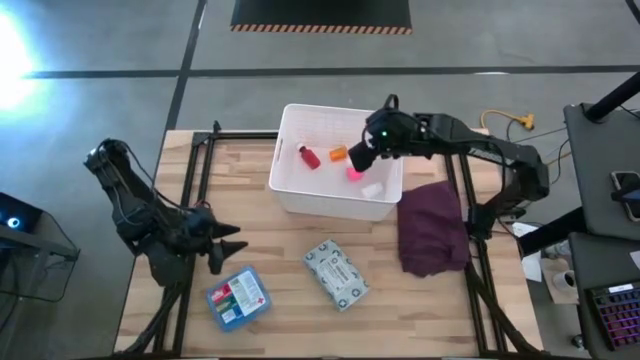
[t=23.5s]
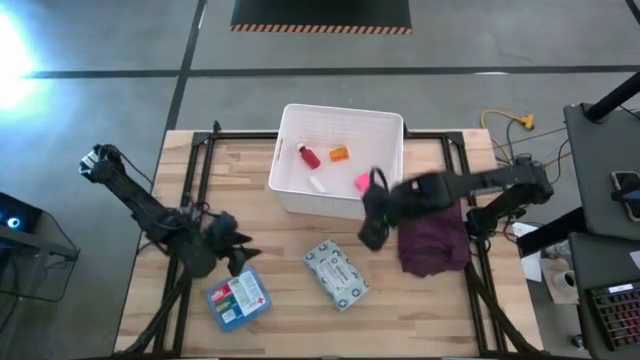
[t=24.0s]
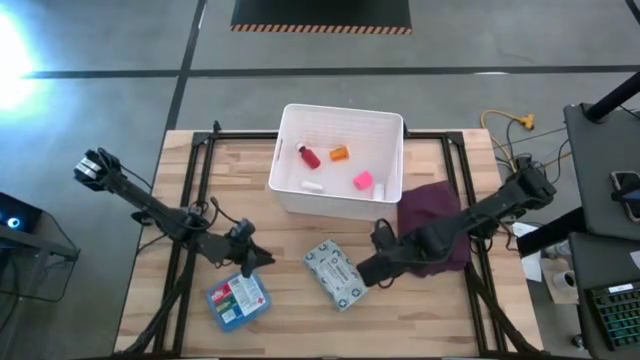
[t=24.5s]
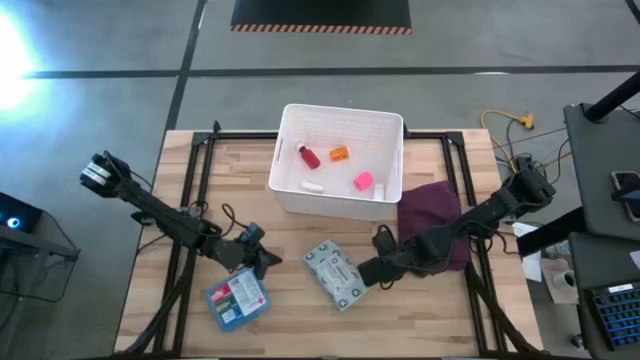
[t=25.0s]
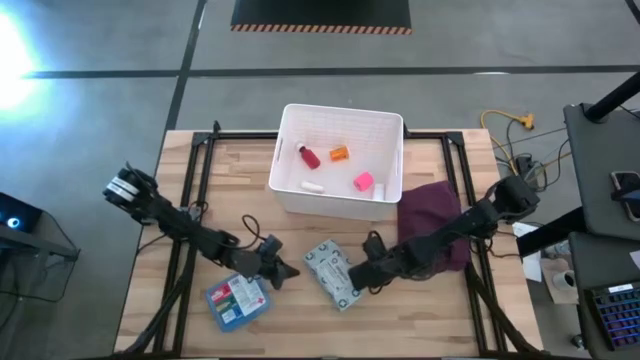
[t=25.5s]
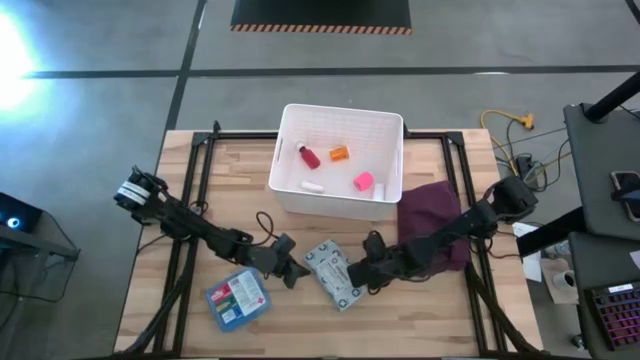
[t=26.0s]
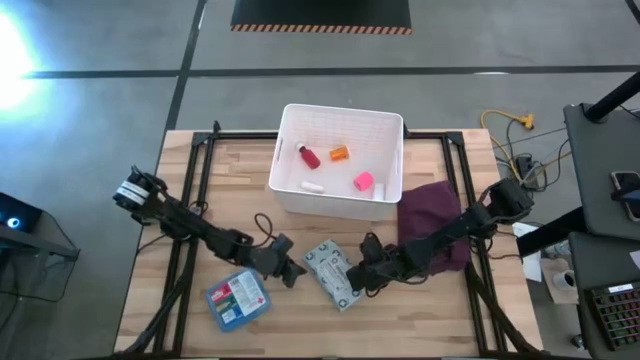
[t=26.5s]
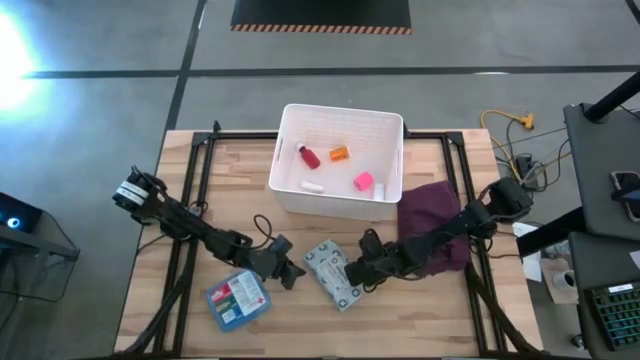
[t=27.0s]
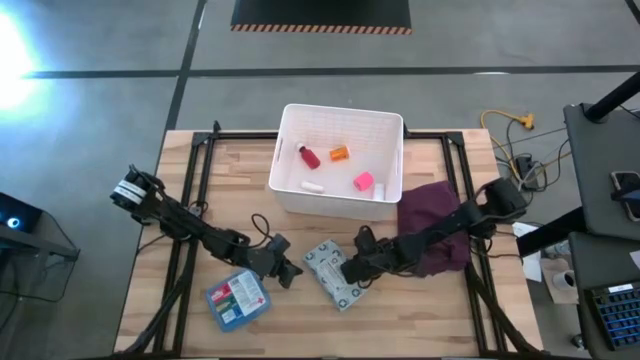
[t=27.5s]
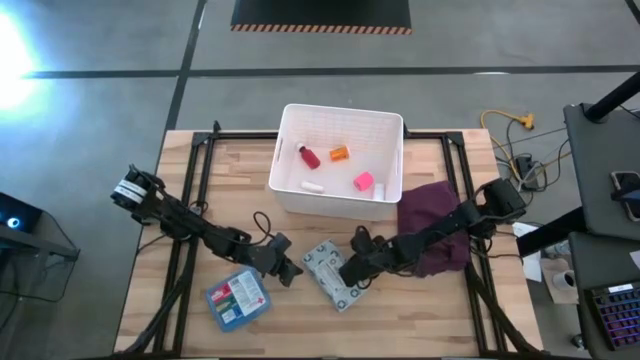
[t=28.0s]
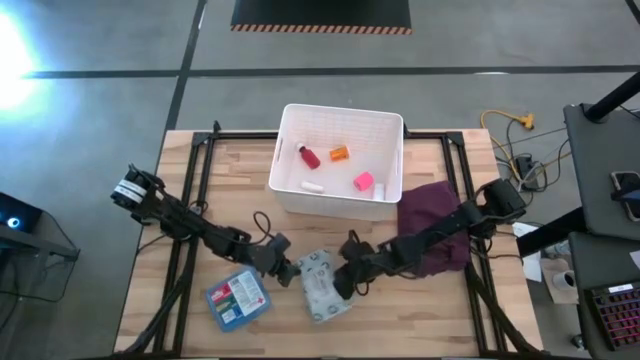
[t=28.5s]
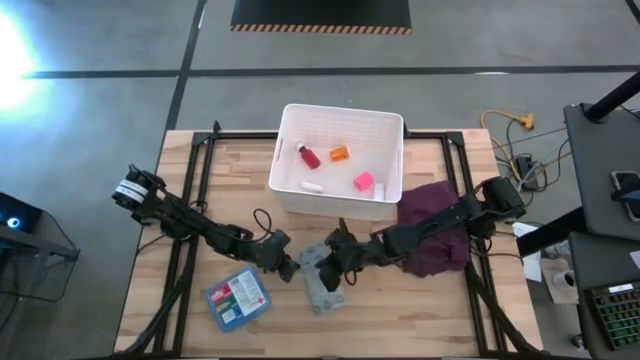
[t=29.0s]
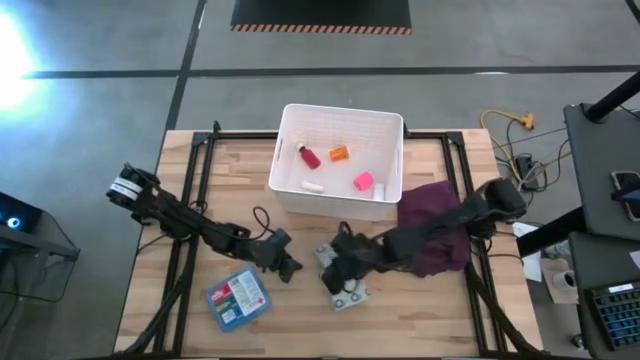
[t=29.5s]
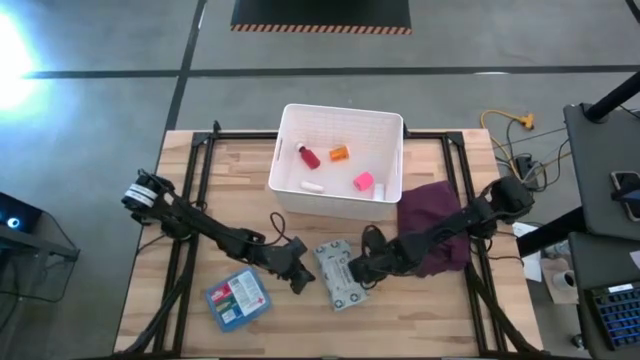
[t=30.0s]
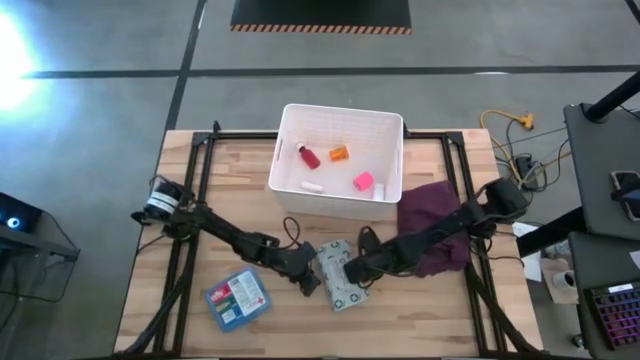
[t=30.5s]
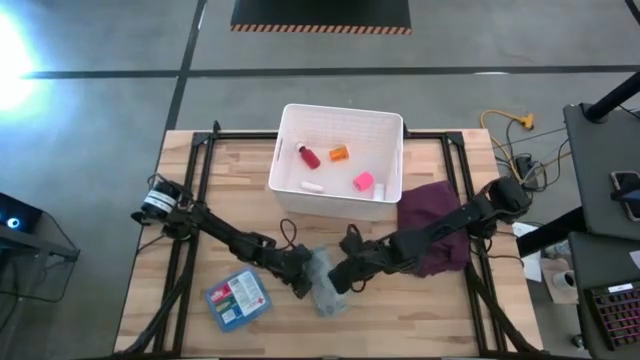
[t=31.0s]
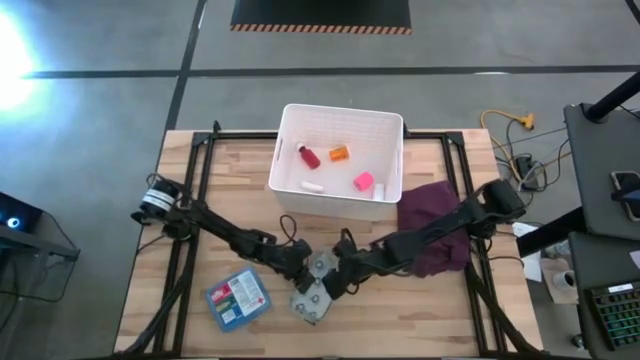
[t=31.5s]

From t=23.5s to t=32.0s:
Task: Pick & place medical supplies in basket/bin
Put the white mailer bag into the white container

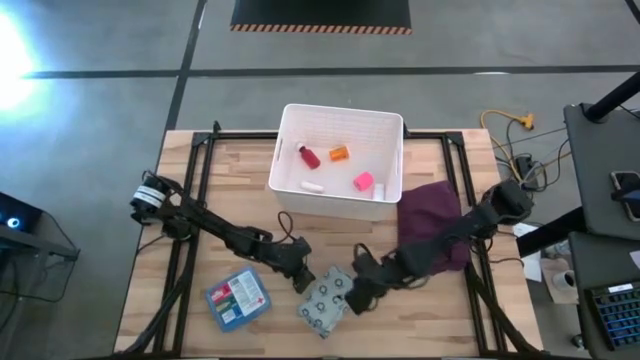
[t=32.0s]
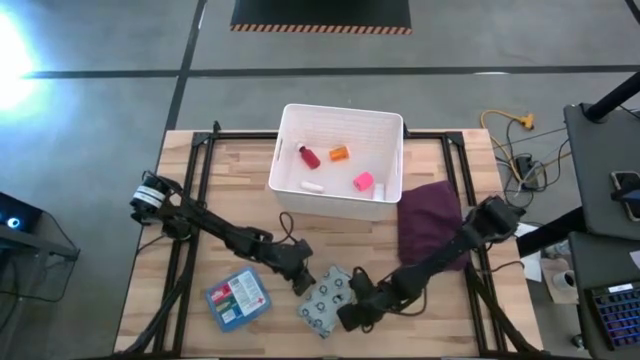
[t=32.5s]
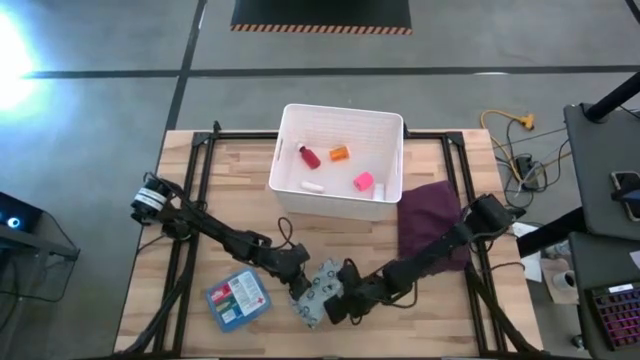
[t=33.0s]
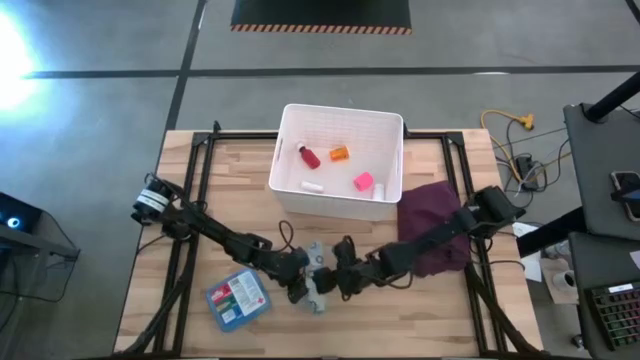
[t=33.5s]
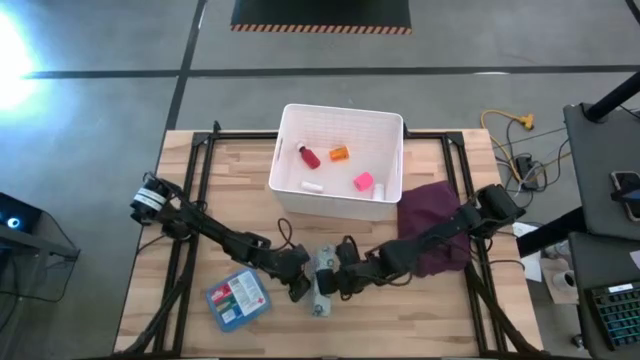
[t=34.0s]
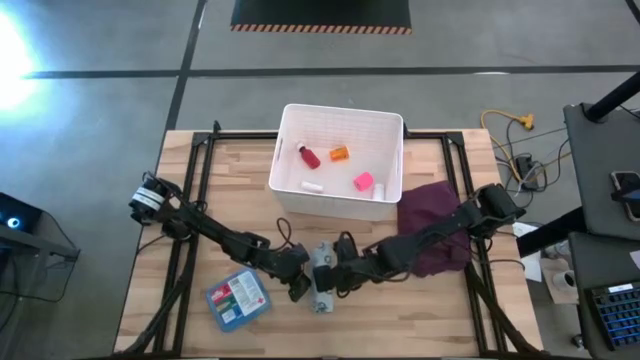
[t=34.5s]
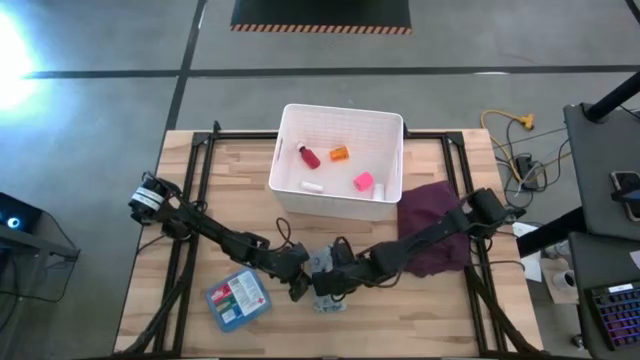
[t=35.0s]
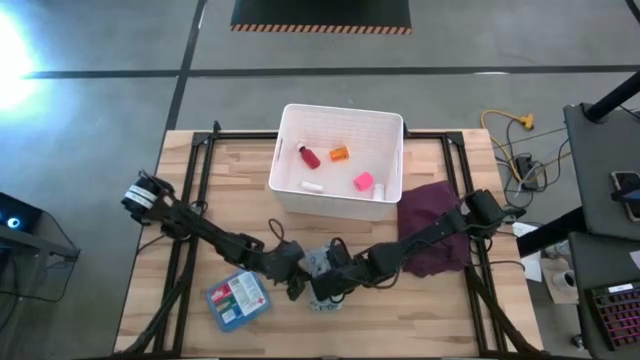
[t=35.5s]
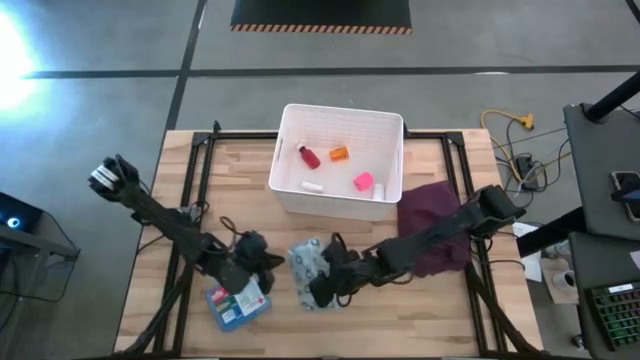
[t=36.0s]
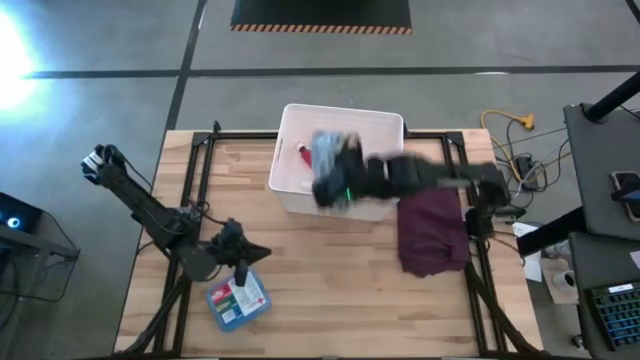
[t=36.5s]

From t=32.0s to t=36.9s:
Put the white mailer bag into the white container

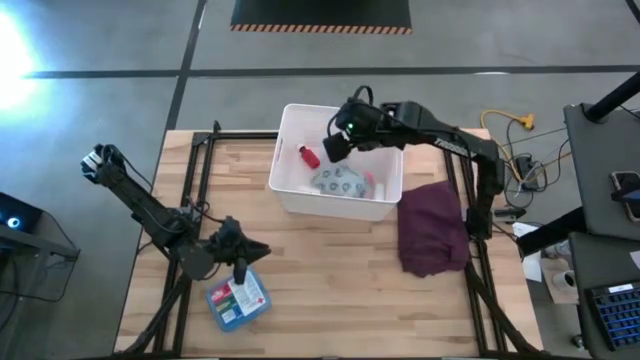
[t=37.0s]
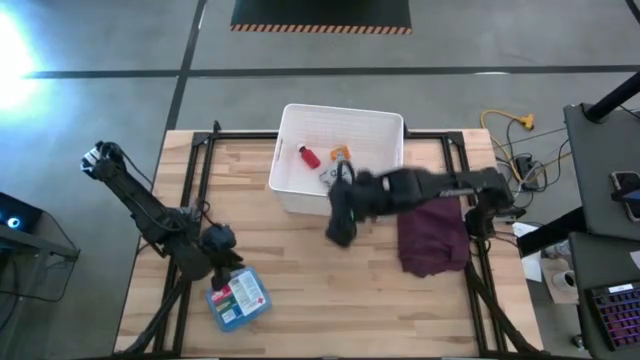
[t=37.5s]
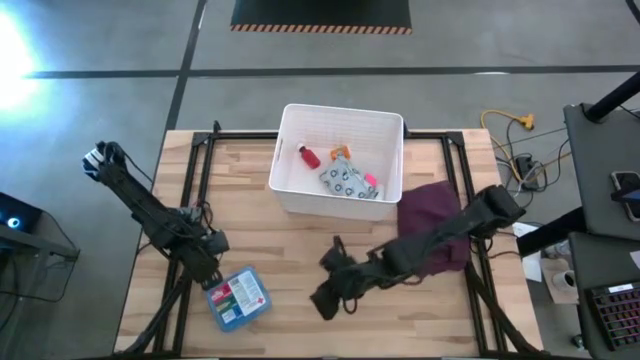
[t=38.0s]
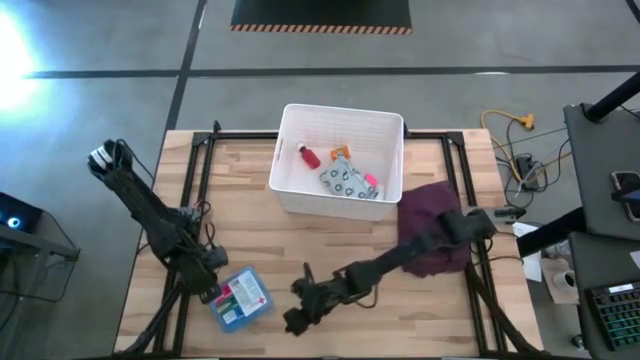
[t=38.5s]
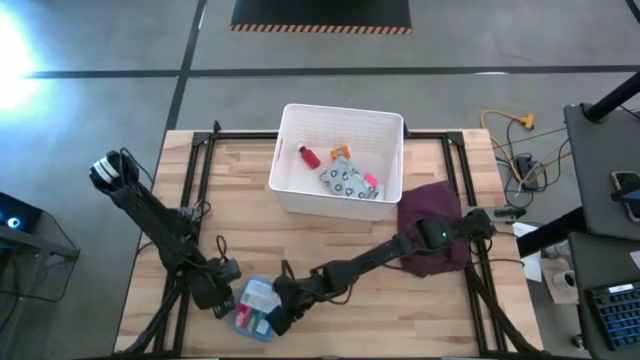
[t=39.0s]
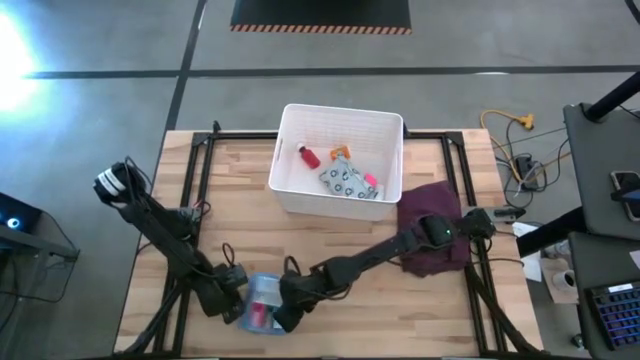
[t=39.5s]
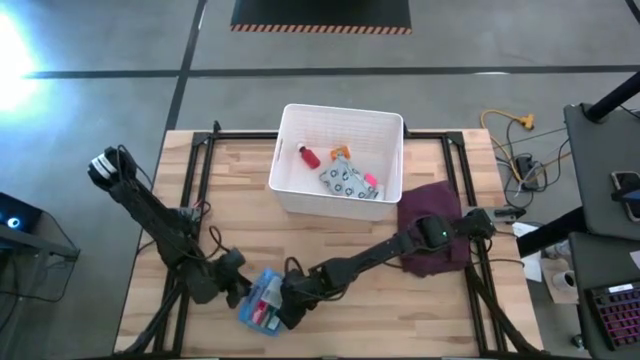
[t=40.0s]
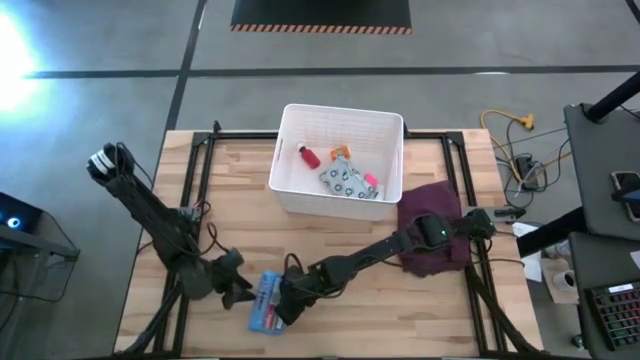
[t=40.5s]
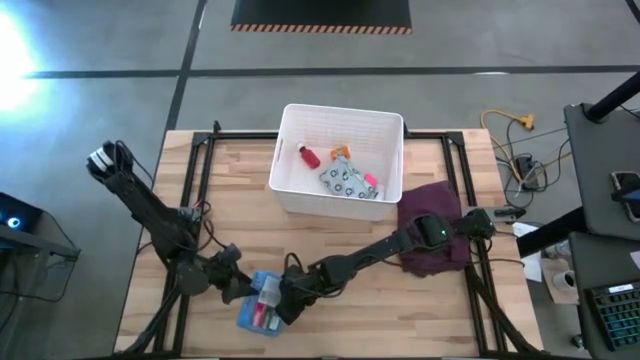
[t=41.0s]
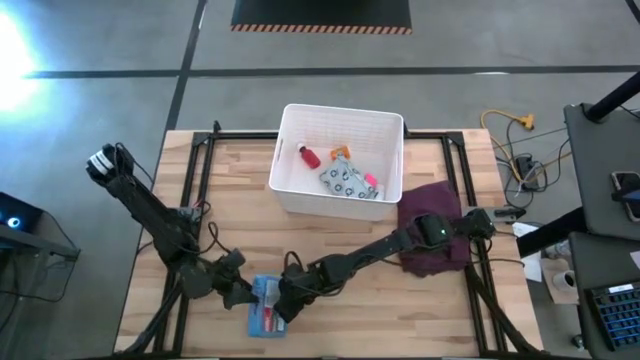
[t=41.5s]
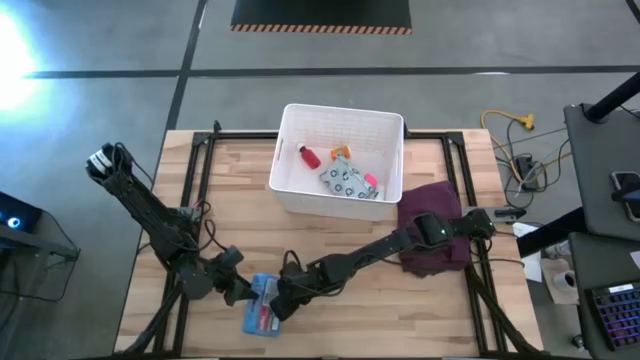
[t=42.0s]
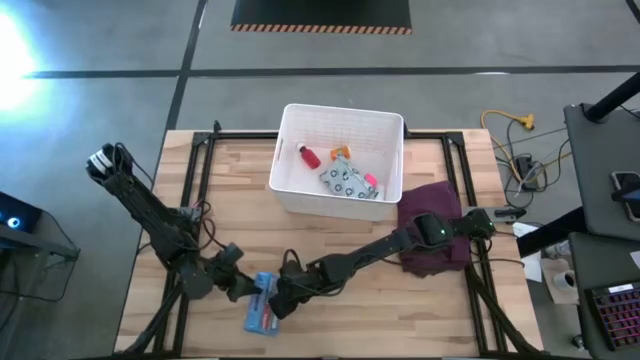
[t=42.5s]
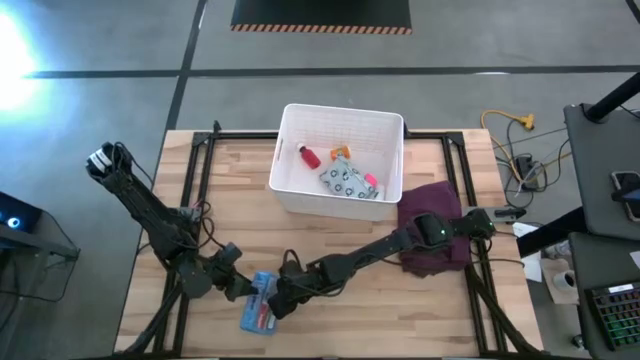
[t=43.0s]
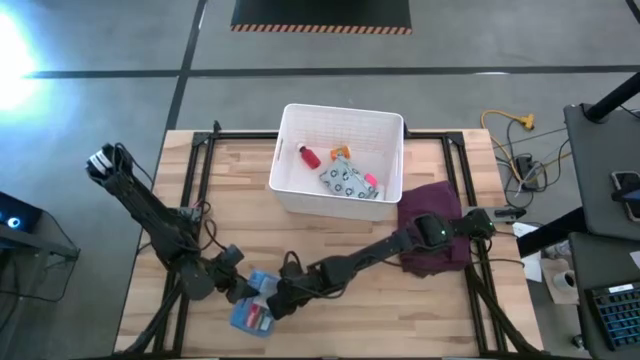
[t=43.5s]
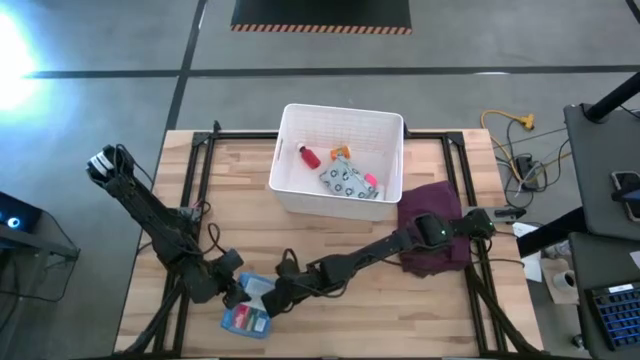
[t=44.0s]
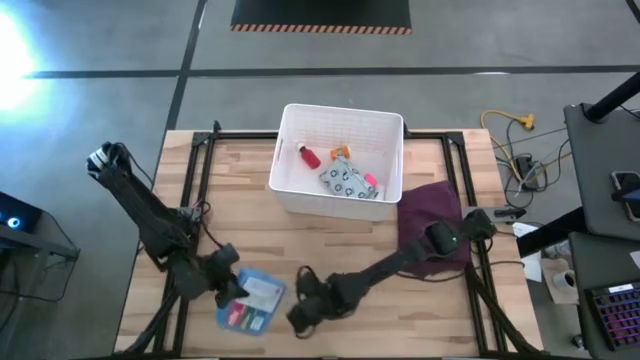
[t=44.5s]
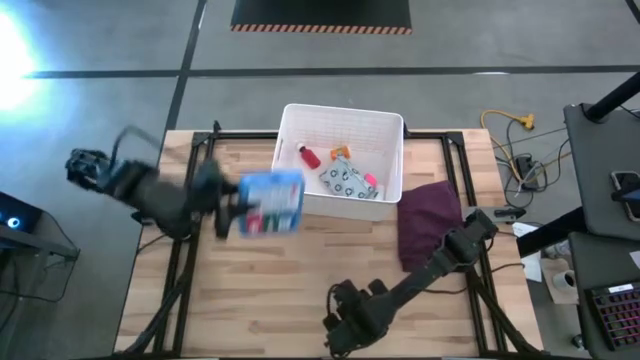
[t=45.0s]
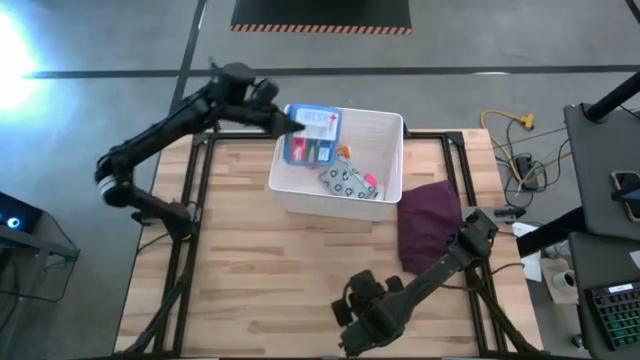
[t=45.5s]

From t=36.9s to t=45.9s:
Put the blue medicine kit into the white container
